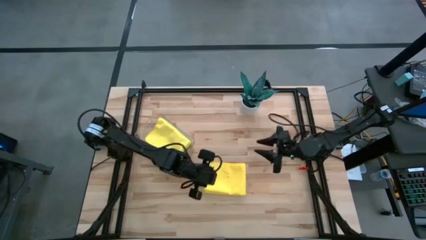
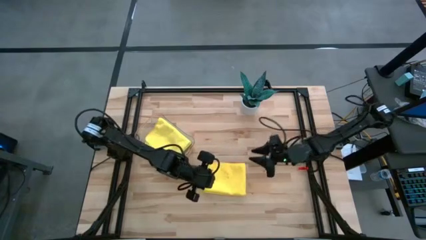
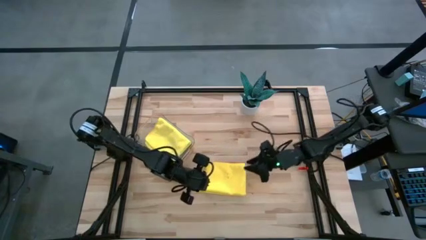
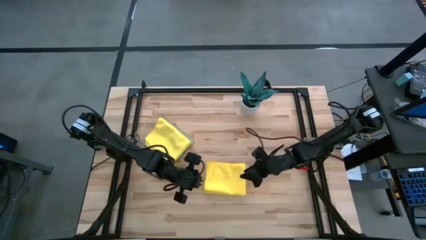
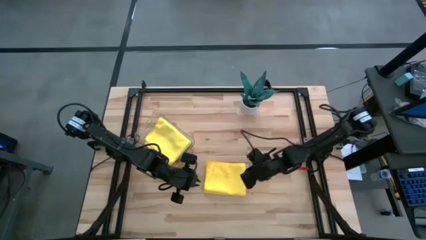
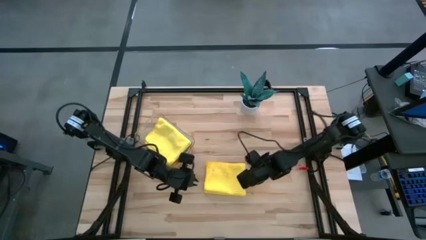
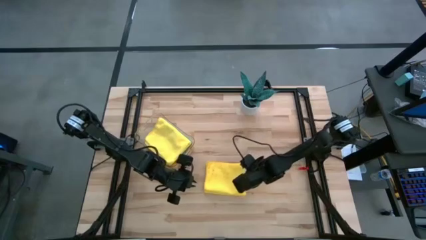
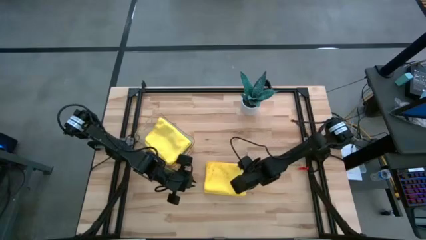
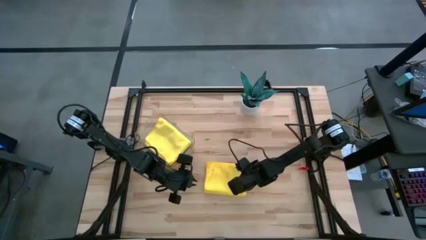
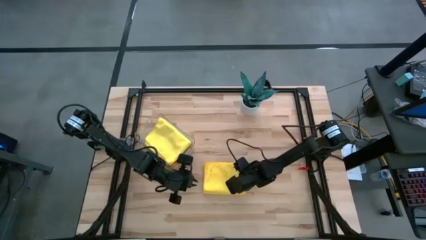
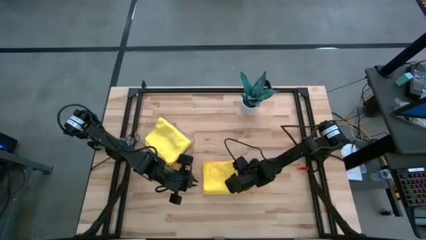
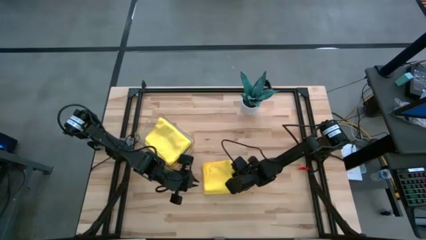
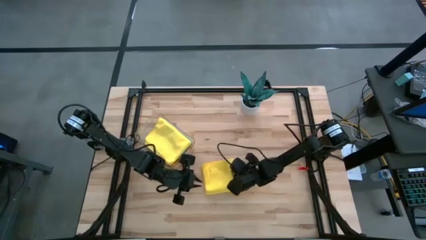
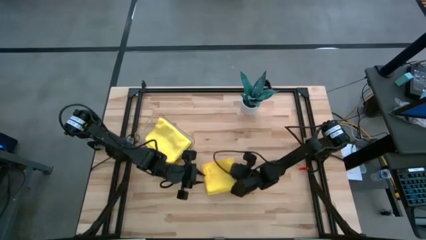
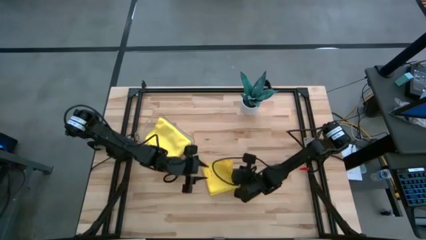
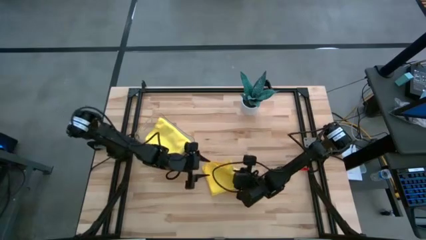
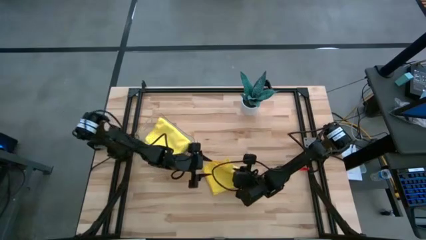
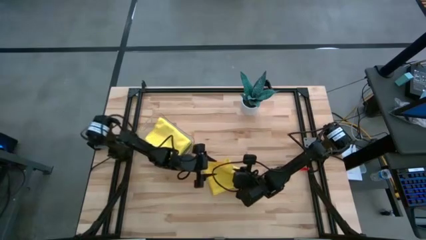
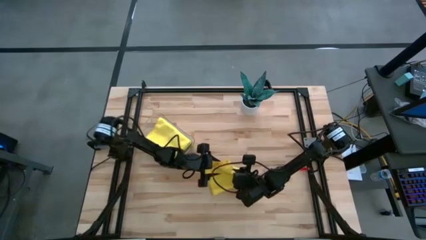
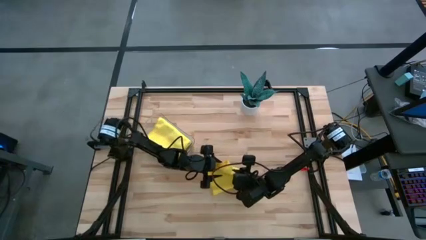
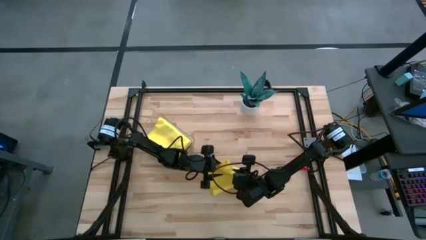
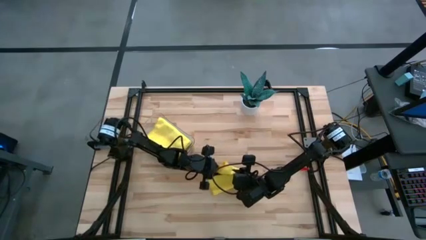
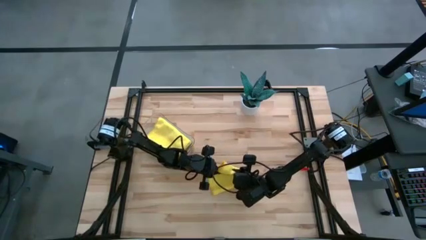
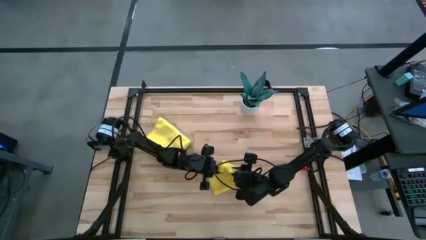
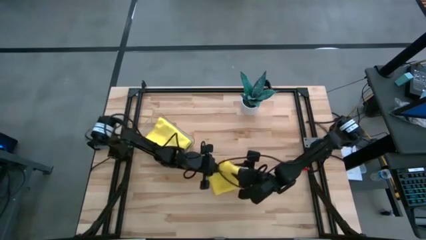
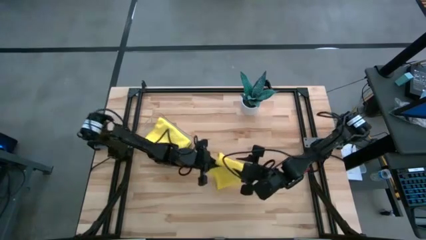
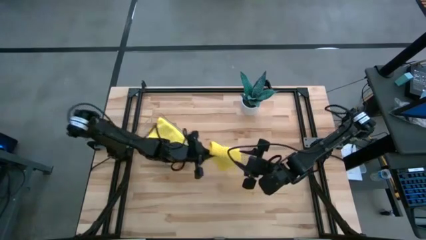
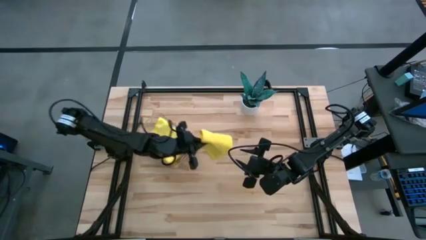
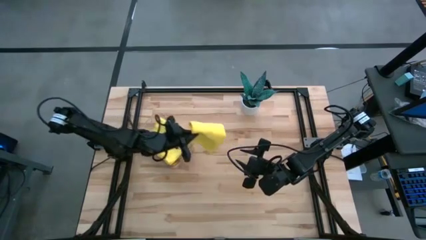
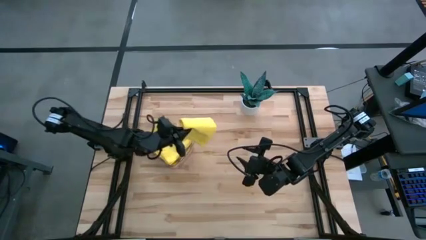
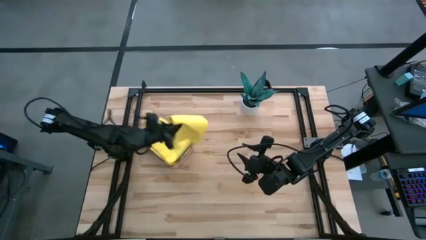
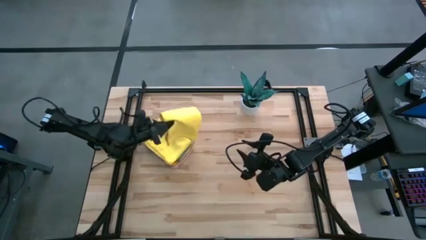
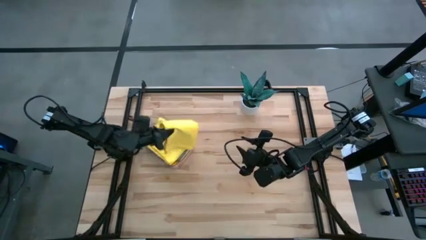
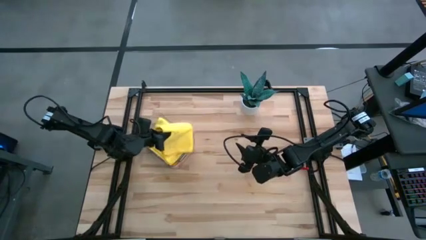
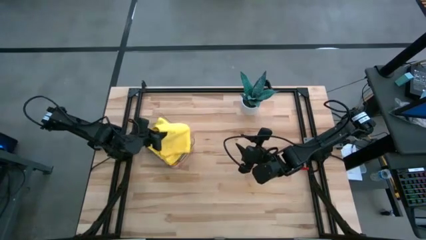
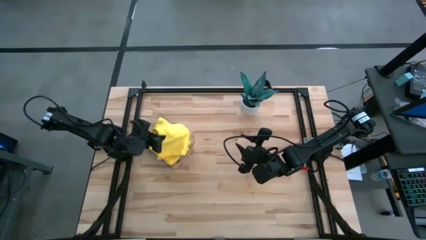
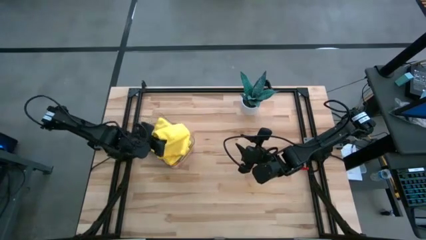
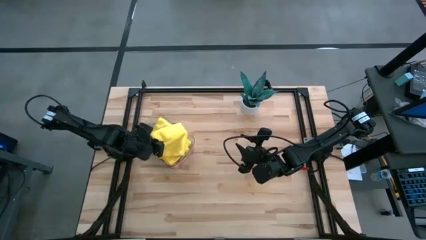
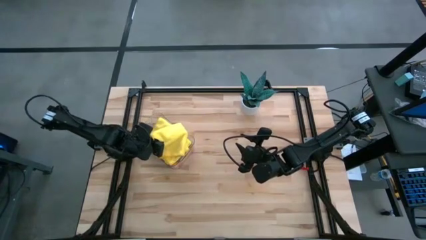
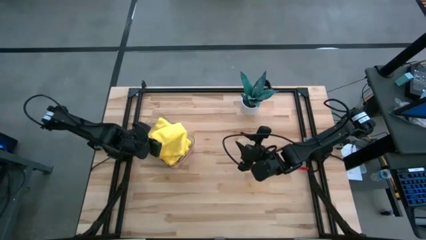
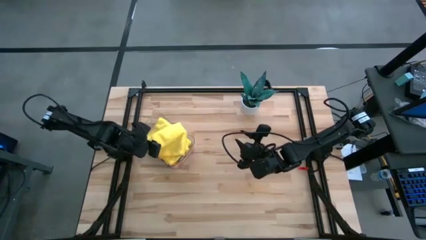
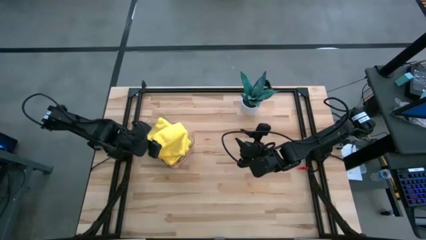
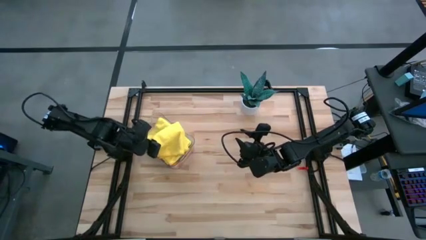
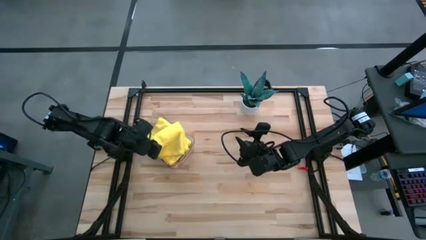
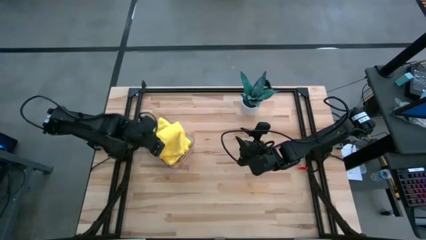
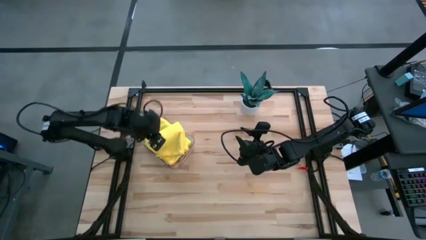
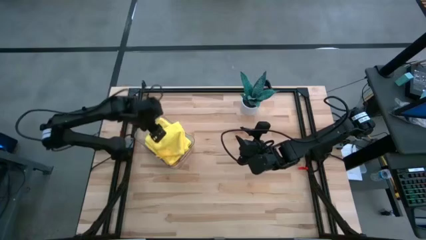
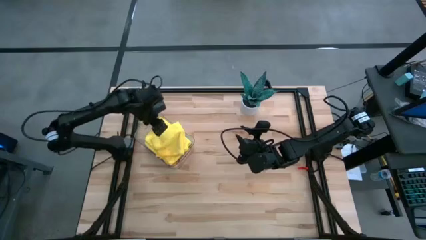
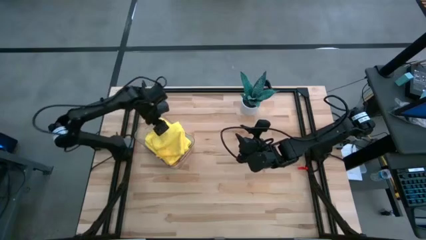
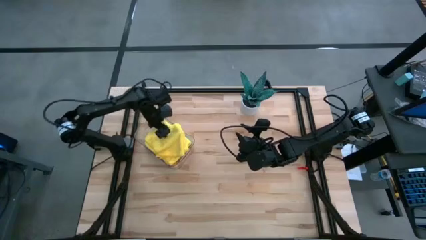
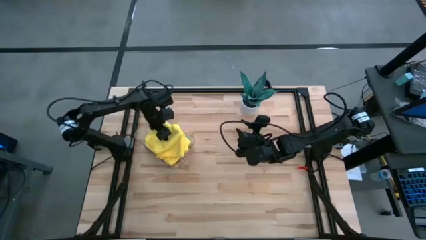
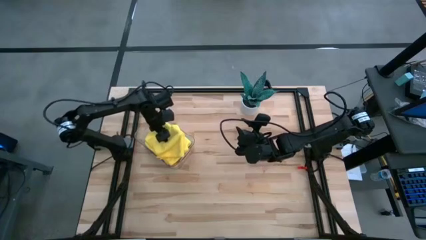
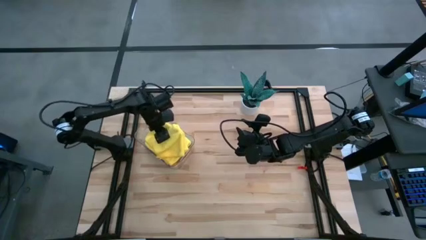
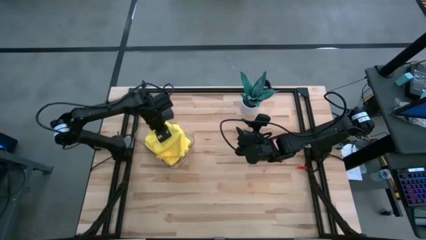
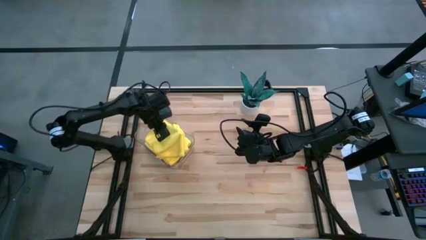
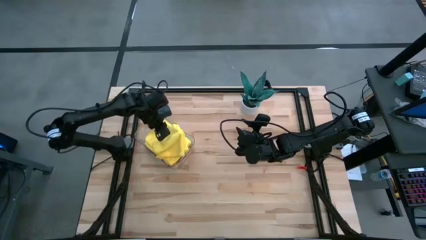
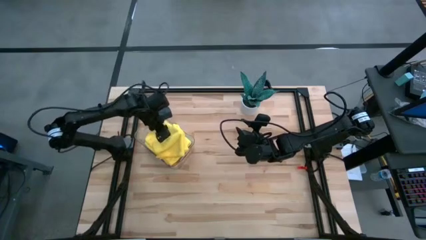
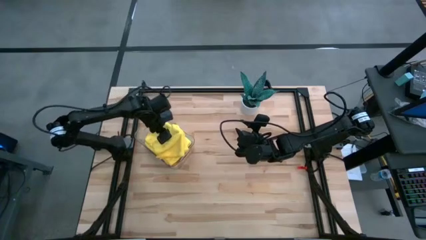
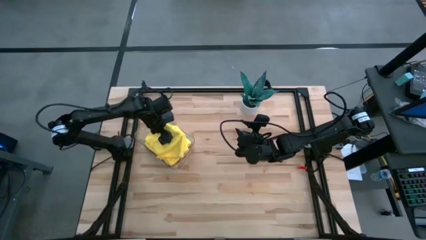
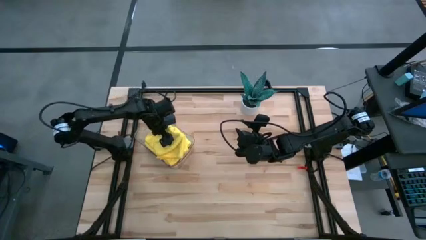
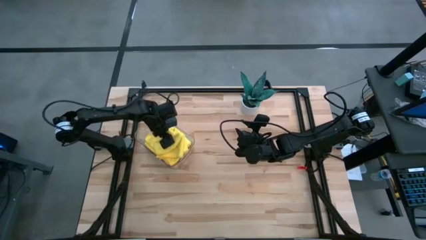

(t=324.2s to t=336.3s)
Task: Fold microfiber towels
Put the yellow microfiber cloth into the transparent bin
